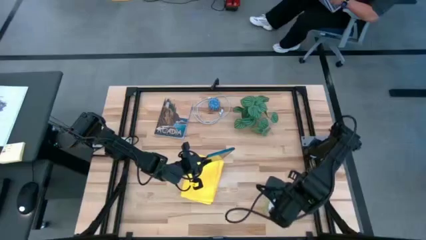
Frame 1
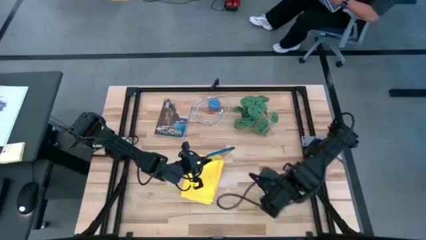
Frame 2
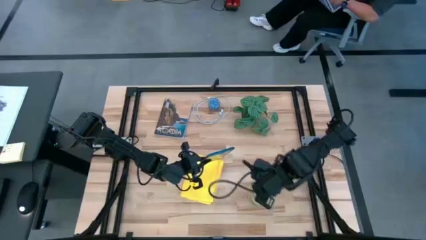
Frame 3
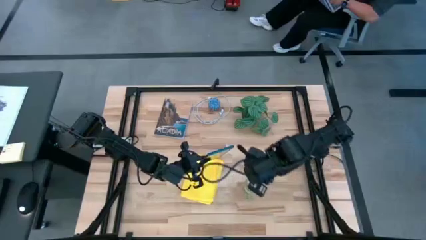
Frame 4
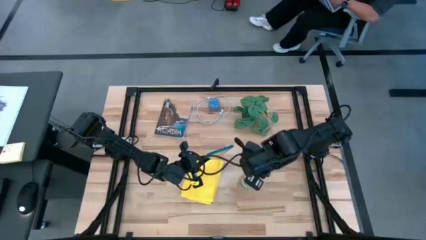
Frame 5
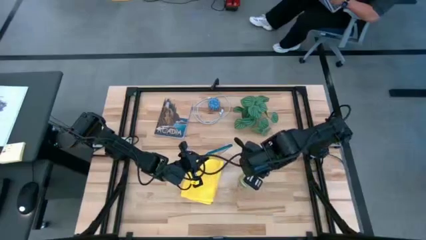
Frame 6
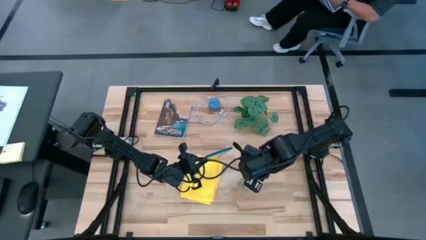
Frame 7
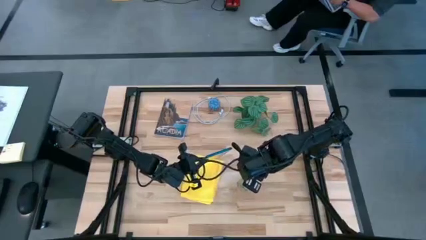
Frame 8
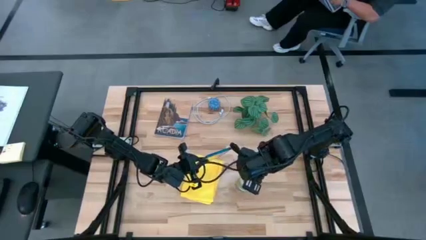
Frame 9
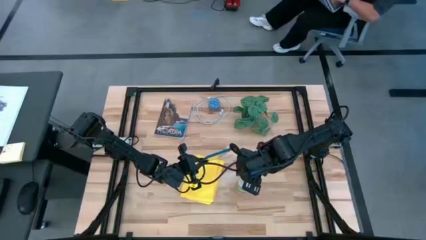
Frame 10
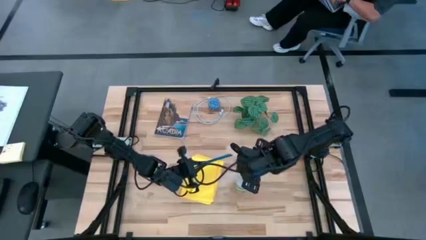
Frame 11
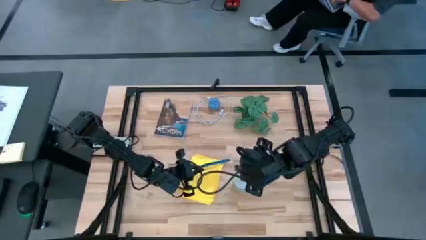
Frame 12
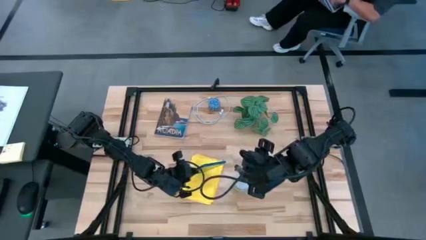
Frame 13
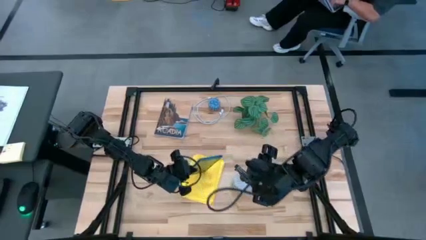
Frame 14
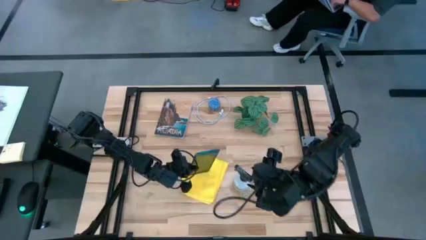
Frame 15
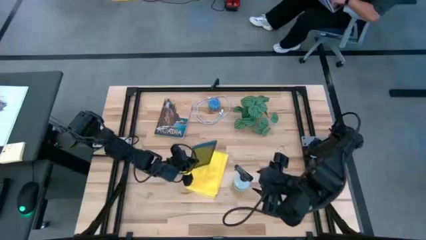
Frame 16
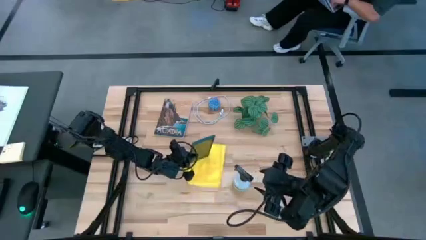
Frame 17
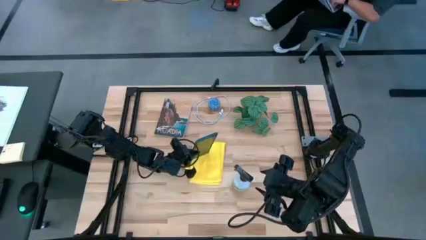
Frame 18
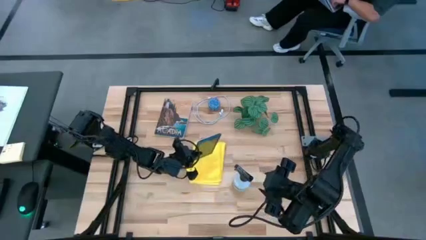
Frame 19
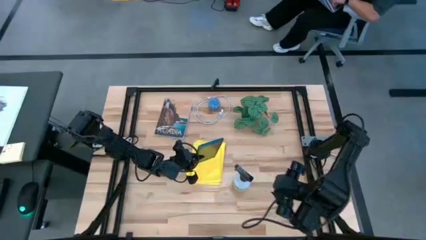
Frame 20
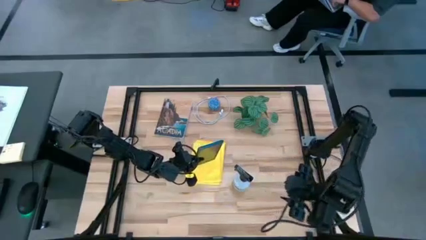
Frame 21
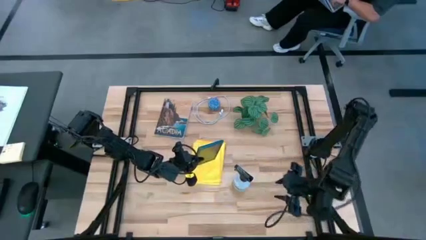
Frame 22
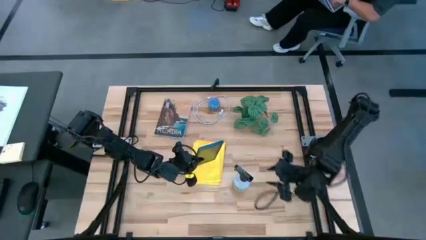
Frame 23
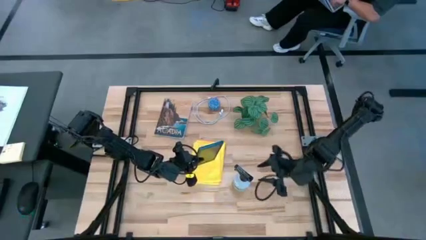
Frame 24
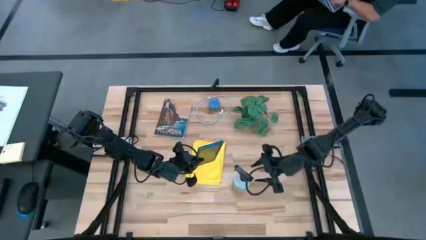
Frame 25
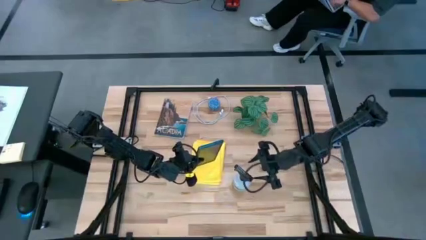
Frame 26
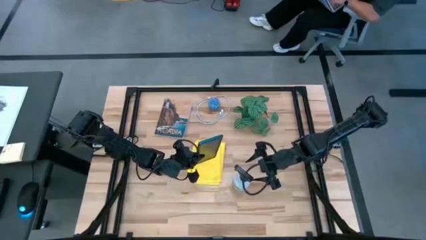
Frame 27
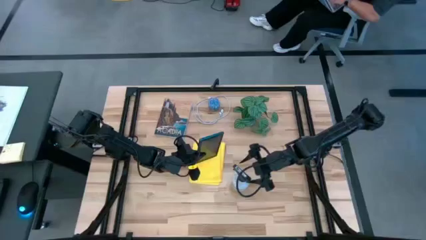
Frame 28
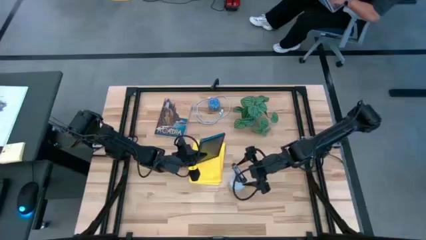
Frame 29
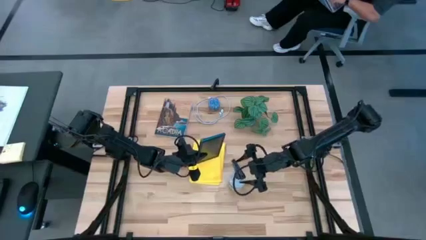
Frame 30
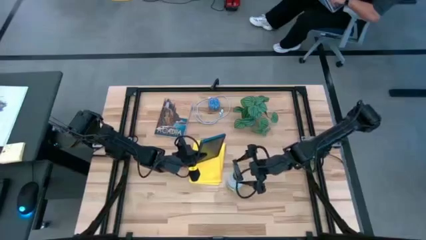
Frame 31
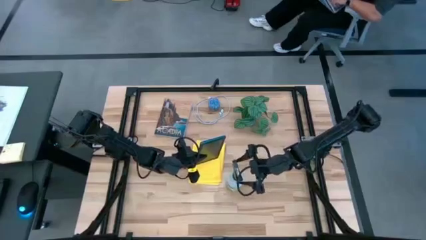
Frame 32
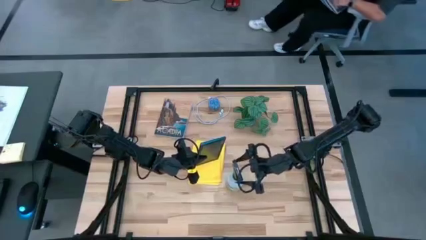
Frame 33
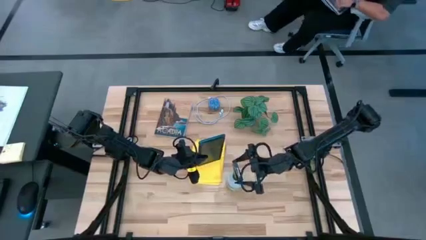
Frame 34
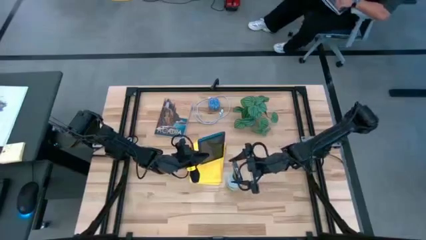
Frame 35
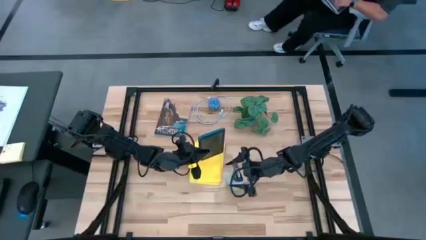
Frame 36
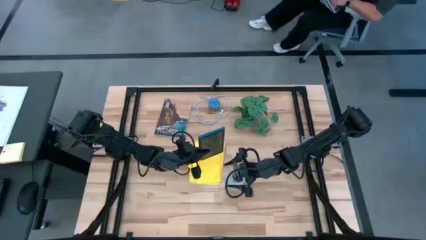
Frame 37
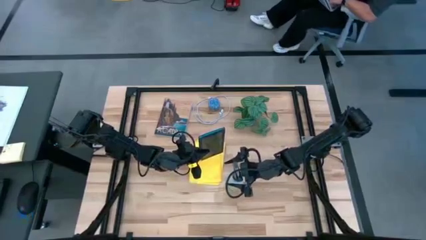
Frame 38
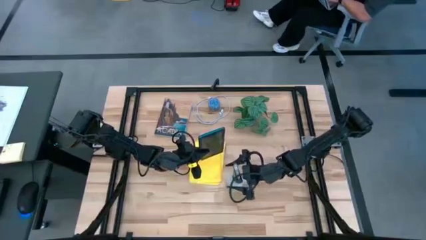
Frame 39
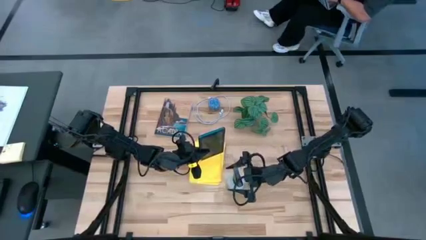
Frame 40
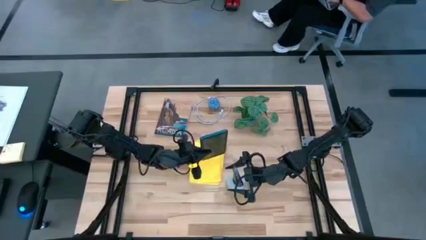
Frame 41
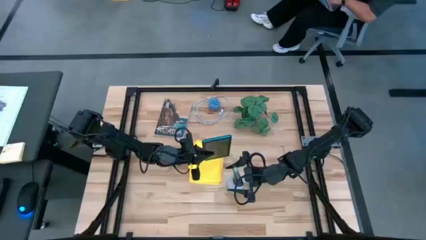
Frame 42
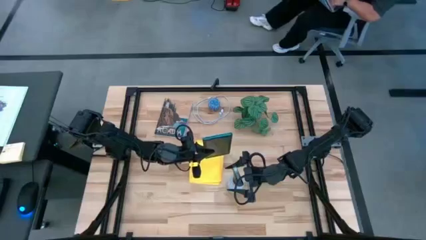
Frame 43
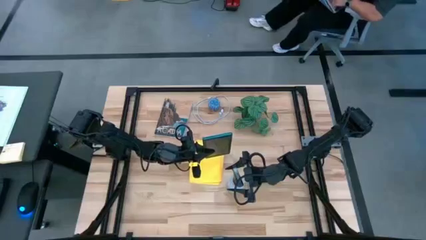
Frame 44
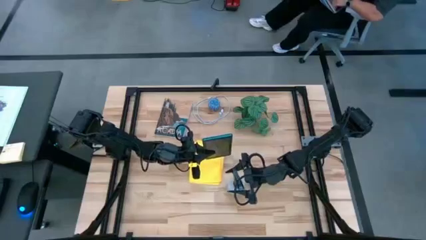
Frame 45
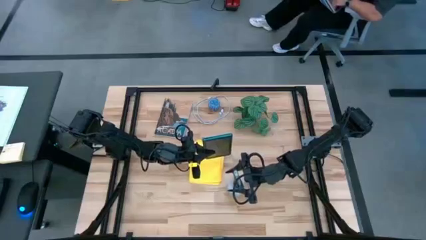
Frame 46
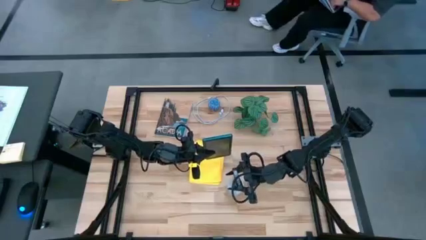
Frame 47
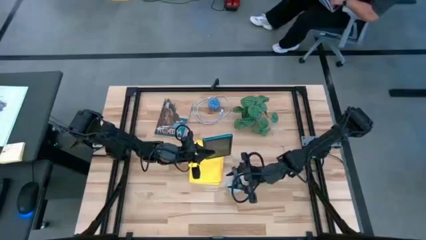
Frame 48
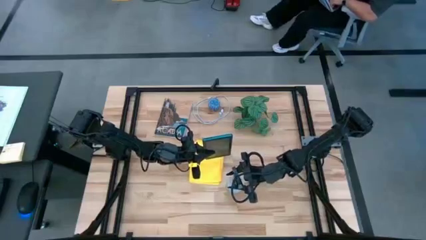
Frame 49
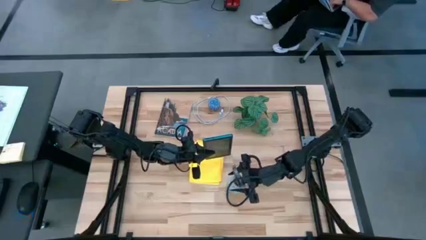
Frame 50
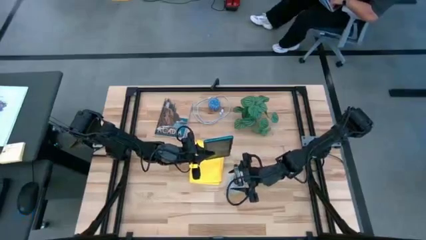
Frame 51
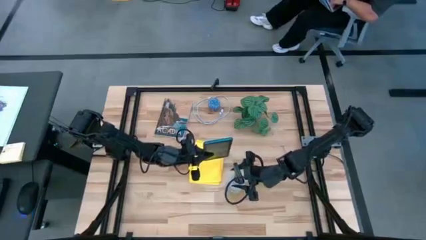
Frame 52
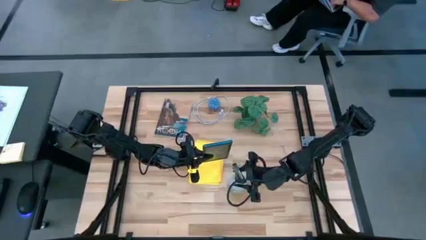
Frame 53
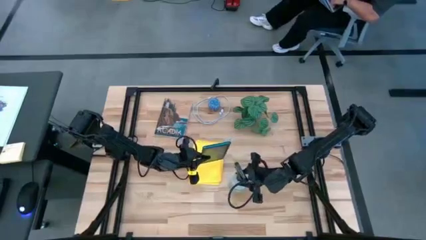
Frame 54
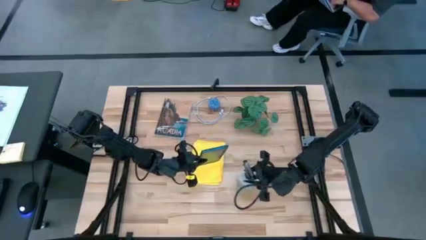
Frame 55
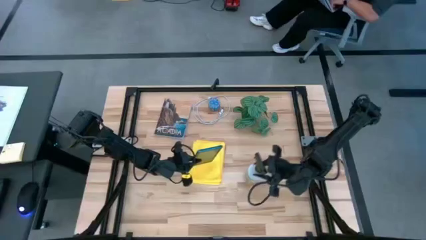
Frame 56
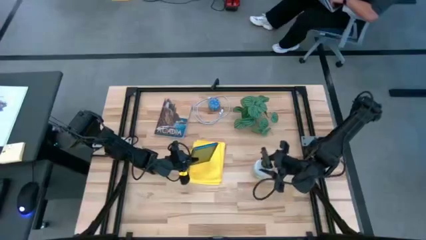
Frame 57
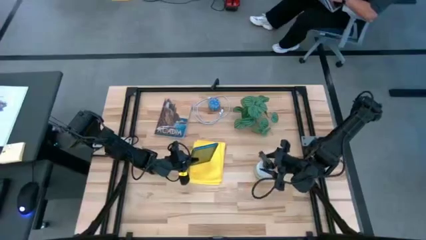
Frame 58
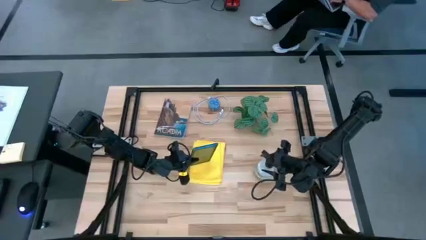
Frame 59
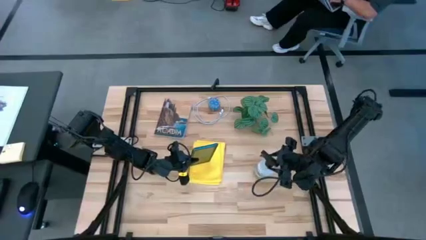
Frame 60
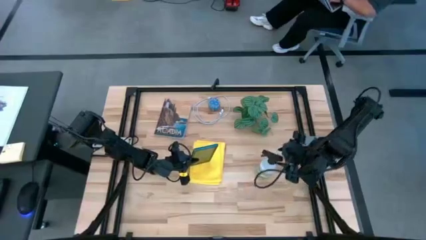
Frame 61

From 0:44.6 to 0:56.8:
Task: Clean tablet
Spray the front of the tablet using the cleaning bottle
